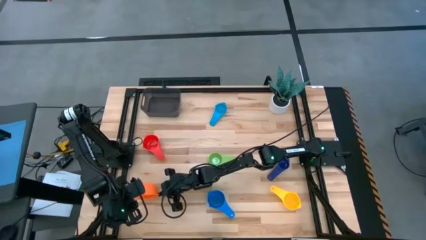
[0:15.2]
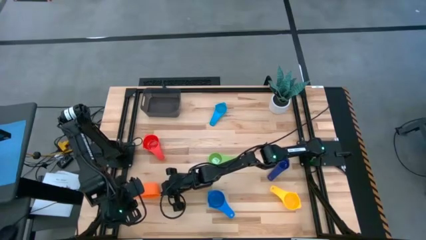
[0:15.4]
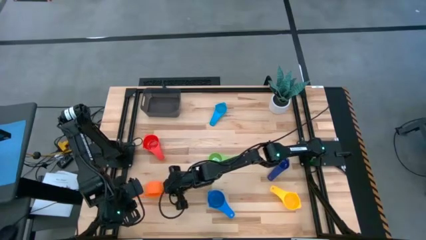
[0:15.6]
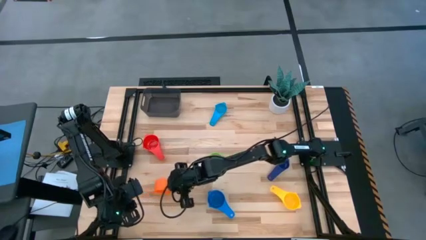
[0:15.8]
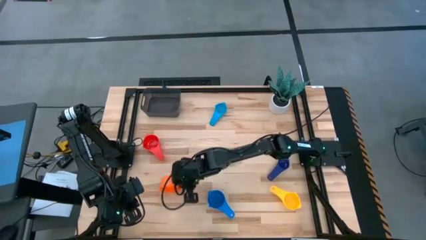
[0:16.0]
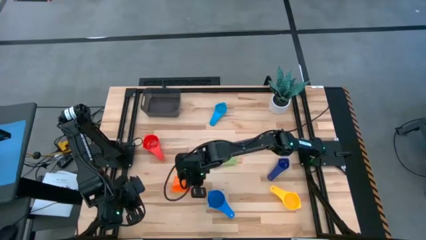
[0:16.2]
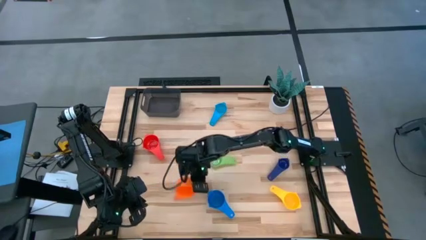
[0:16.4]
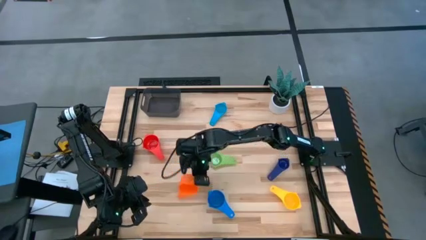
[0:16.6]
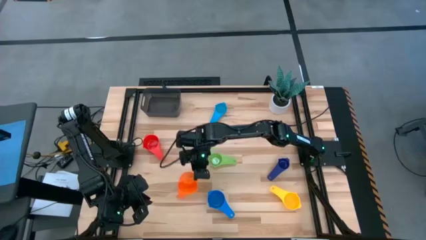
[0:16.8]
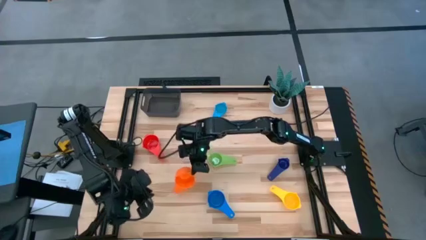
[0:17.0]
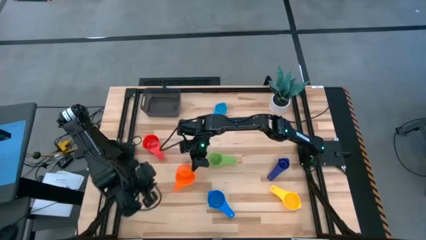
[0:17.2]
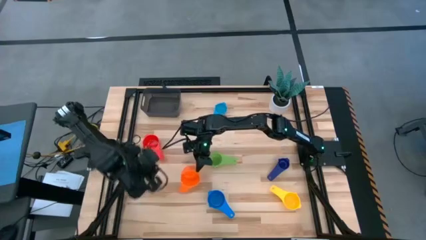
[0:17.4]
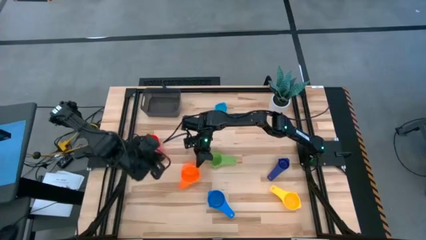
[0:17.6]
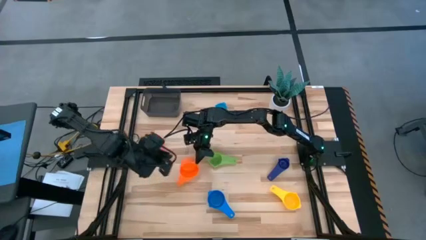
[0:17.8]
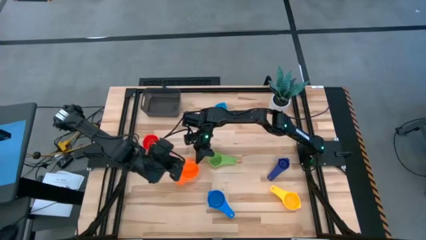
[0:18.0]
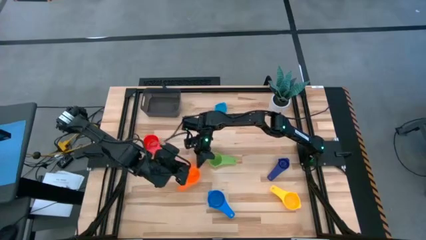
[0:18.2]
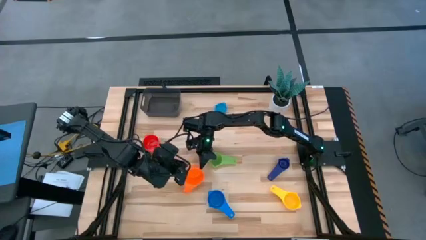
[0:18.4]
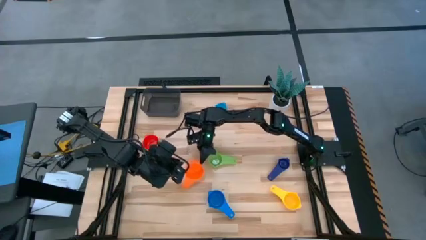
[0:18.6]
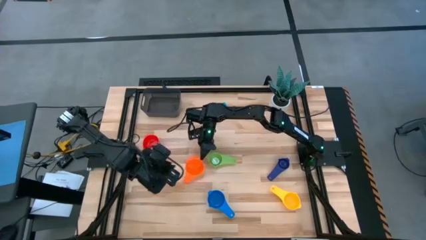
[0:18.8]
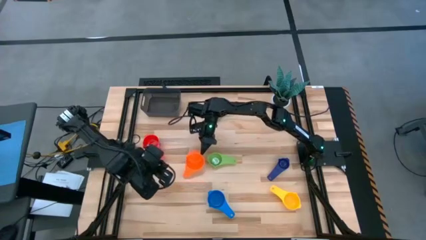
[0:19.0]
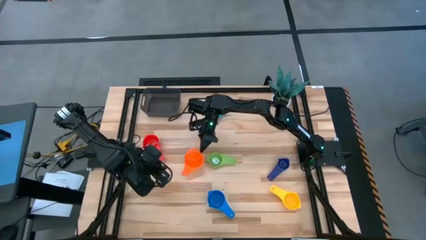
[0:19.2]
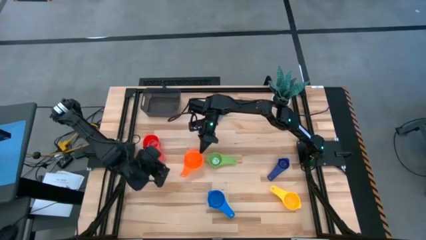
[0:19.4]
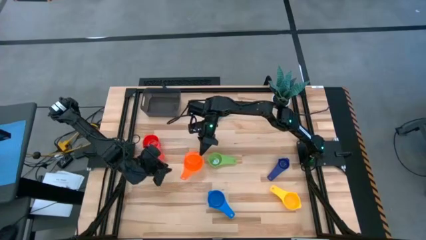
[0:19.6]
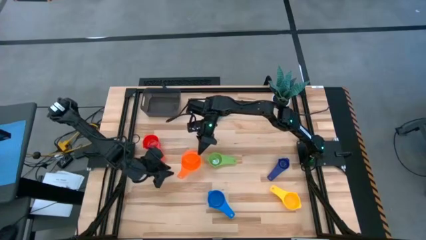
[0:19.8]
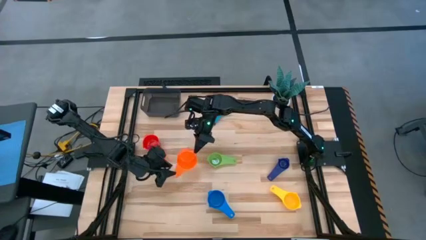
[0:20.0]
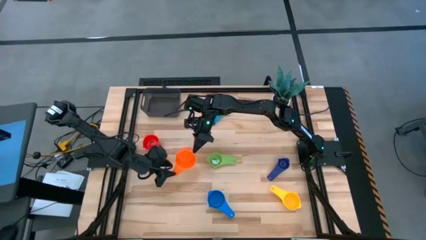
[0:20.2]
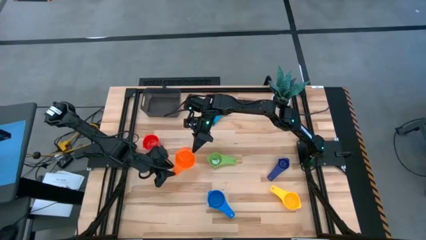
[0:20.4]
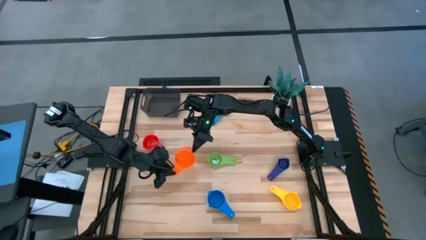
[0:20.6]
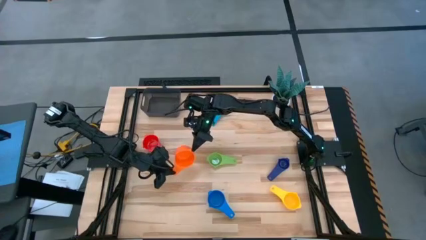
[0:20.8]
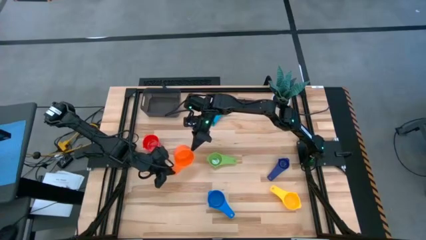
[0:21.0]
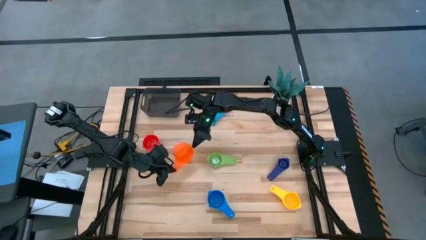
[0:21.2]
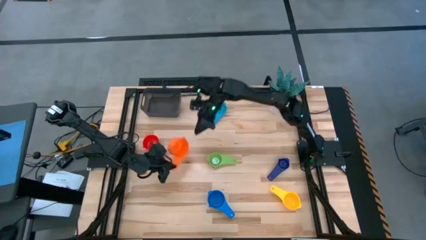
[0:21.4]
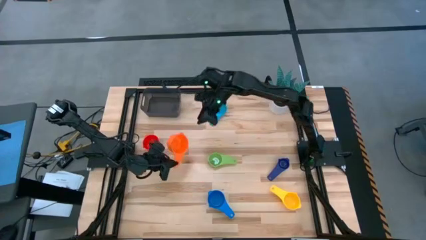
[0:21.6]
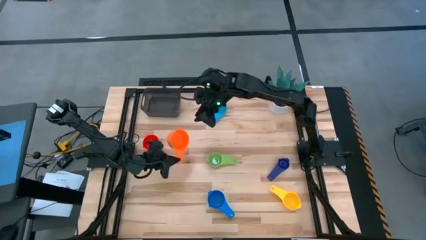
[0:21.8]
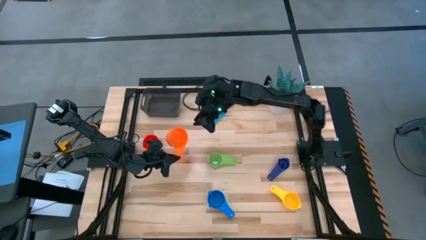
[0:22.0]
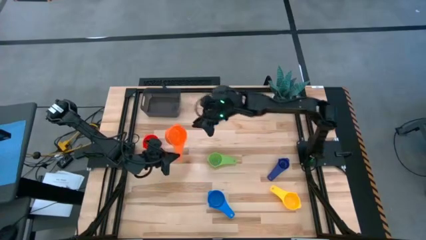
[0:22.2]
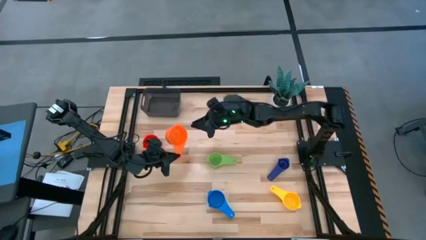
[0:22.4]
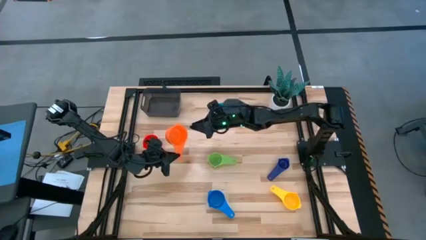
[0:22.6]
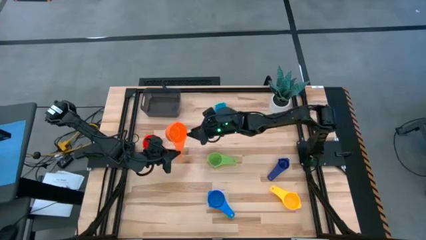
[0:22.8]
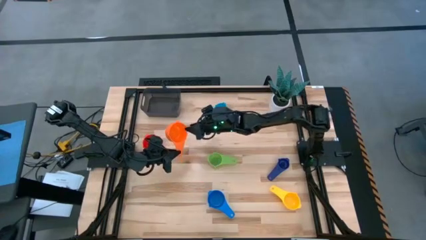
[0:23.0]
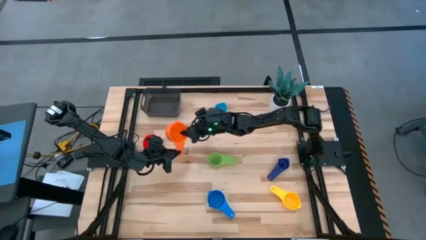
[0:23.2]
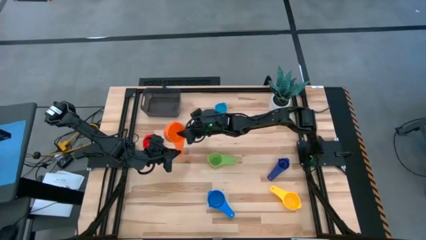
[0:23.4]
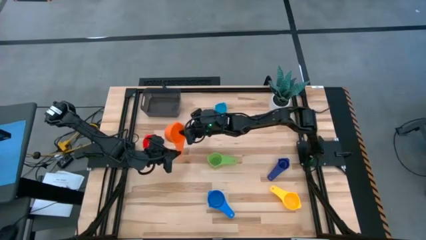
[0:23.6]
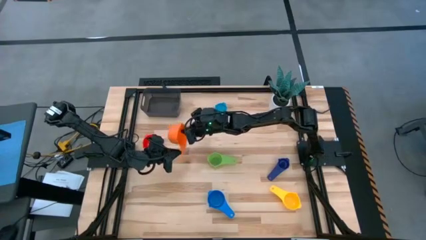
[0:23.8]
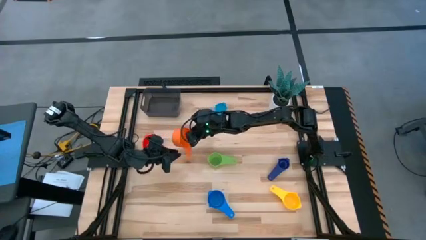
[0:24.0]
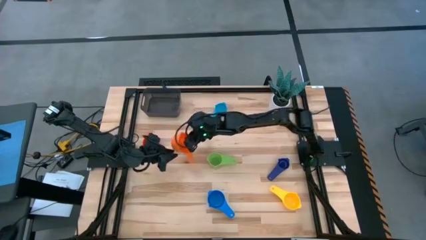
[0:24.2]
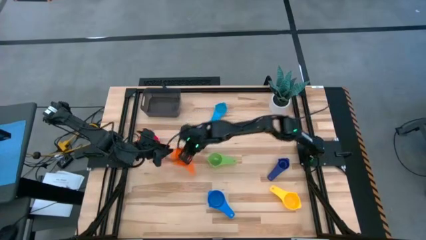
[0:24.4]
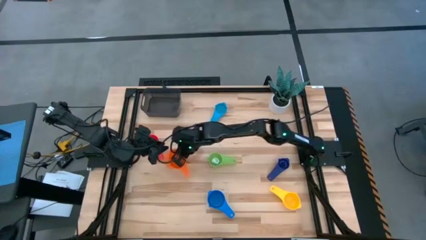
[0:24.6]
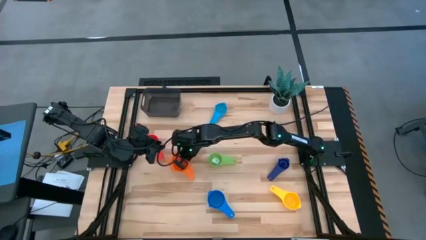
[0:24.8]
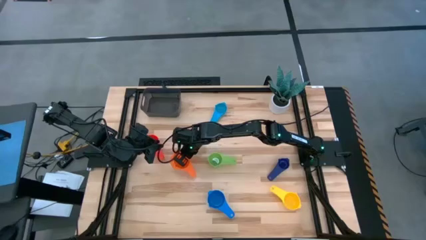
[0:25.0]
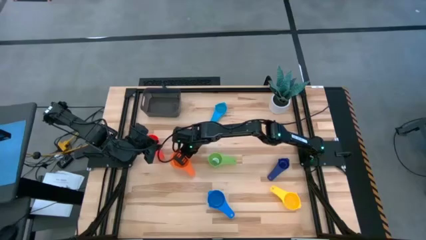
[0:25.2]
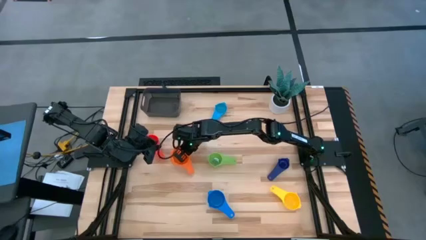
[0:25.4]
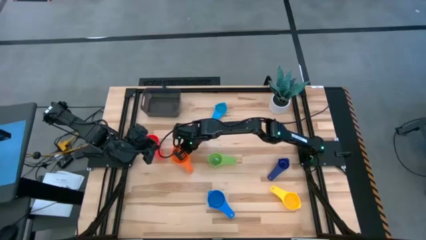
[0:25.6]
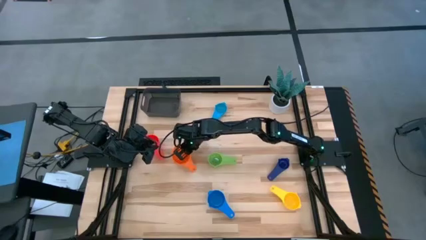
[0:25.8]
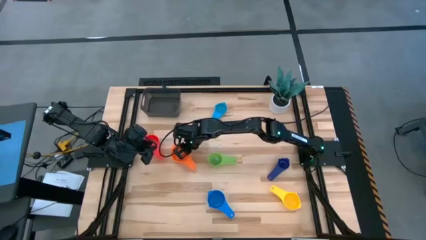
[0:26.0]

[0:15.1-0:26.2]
Task: Nest measuring cups in basket
Move the orange measuring cup to the center of the table
